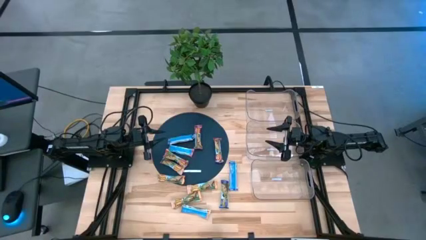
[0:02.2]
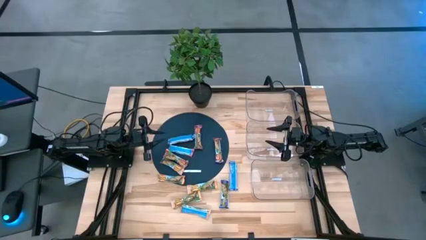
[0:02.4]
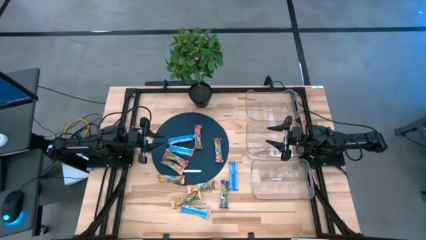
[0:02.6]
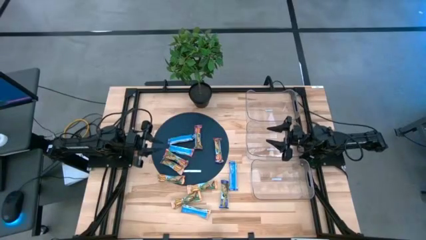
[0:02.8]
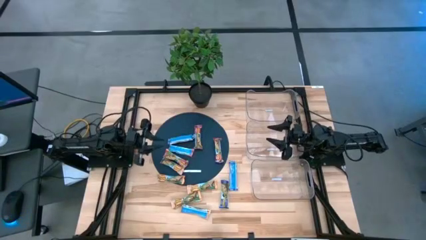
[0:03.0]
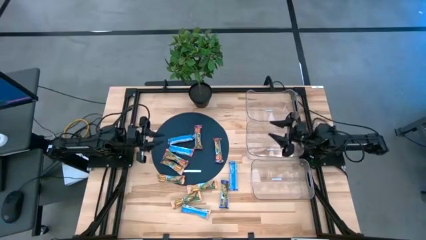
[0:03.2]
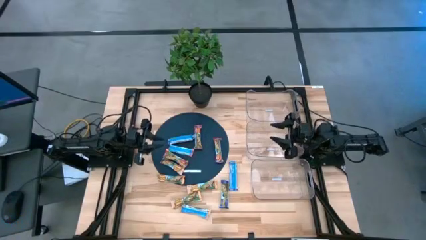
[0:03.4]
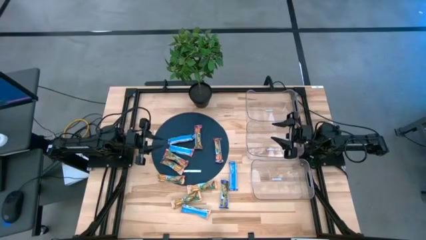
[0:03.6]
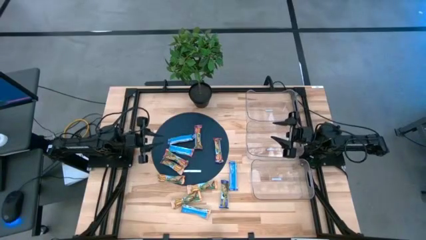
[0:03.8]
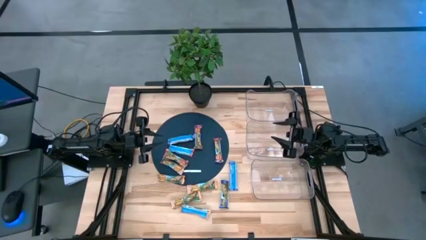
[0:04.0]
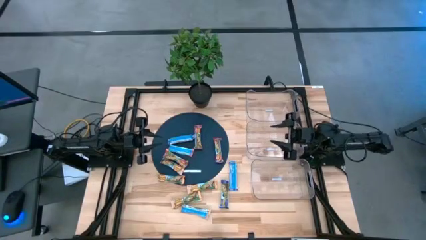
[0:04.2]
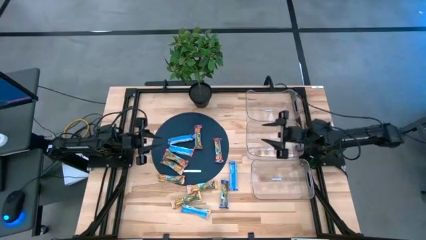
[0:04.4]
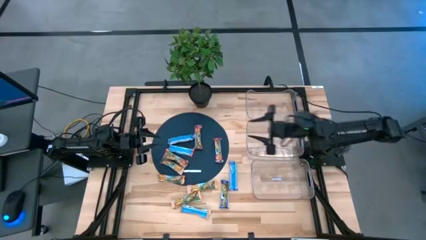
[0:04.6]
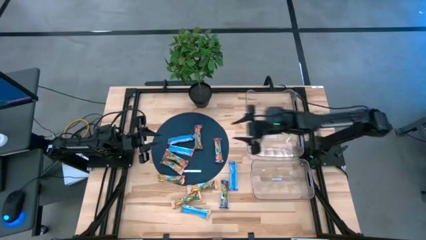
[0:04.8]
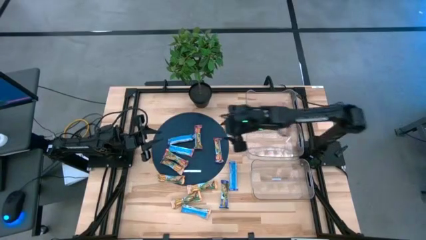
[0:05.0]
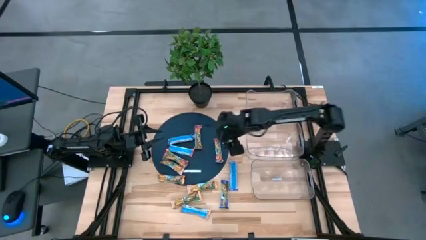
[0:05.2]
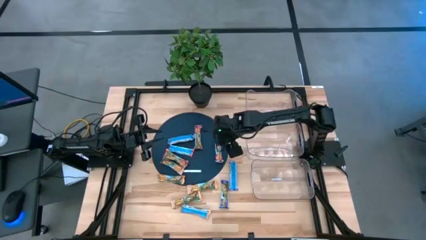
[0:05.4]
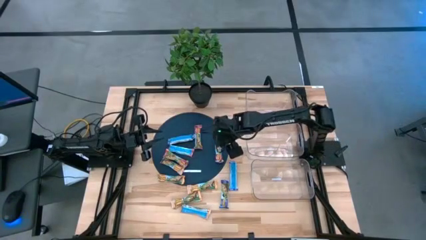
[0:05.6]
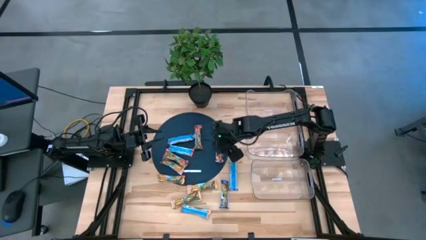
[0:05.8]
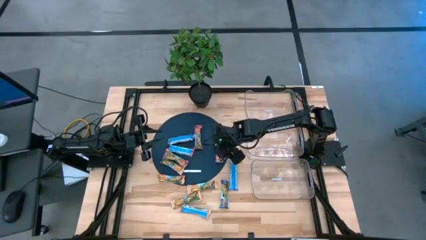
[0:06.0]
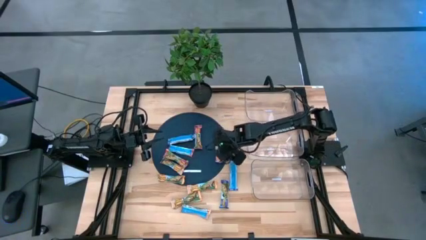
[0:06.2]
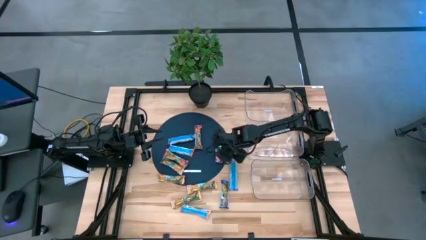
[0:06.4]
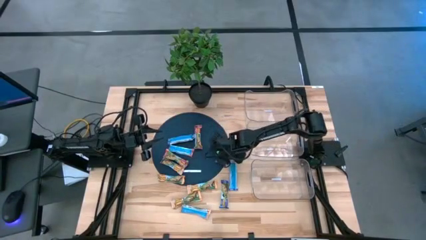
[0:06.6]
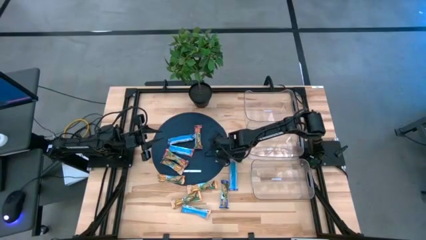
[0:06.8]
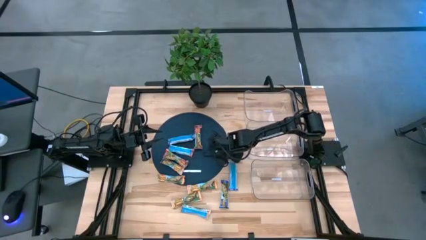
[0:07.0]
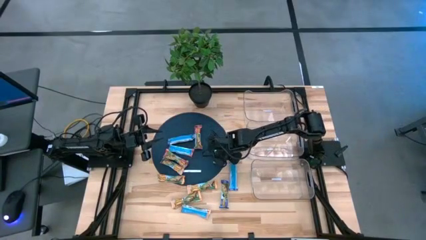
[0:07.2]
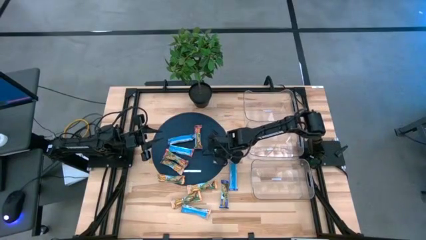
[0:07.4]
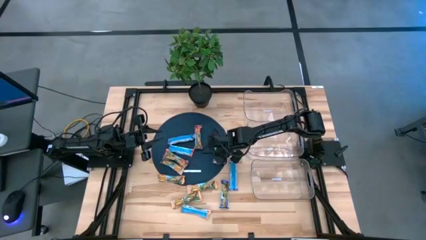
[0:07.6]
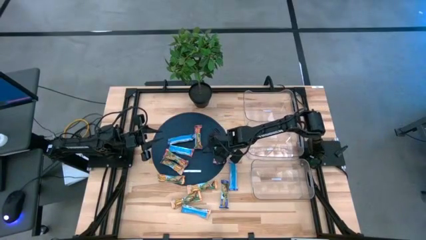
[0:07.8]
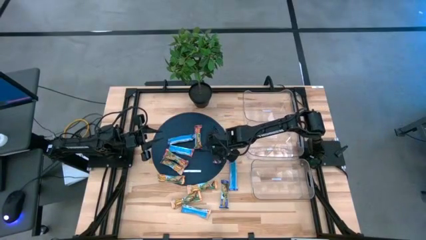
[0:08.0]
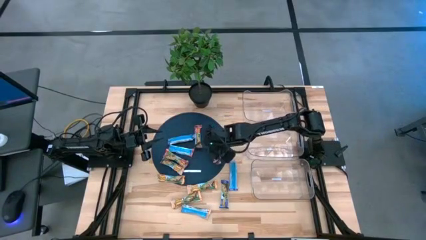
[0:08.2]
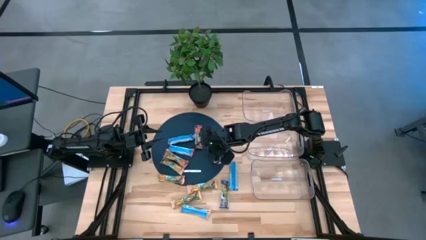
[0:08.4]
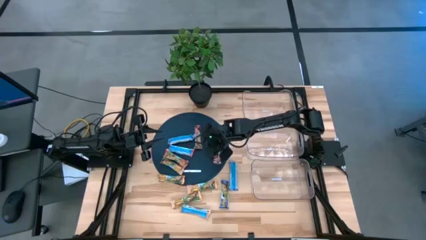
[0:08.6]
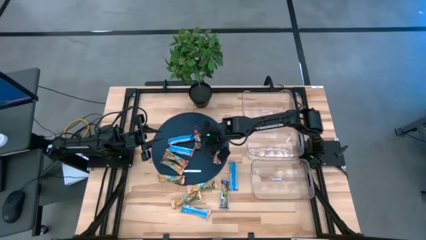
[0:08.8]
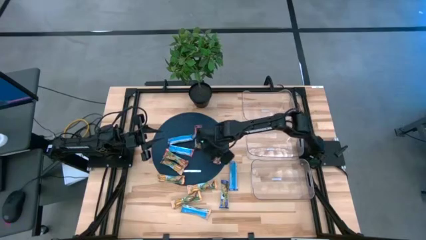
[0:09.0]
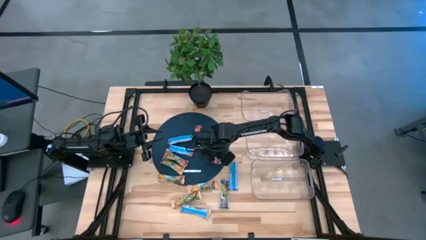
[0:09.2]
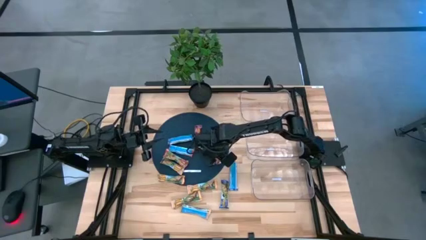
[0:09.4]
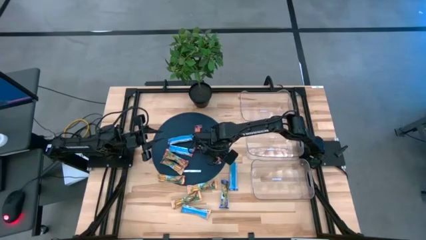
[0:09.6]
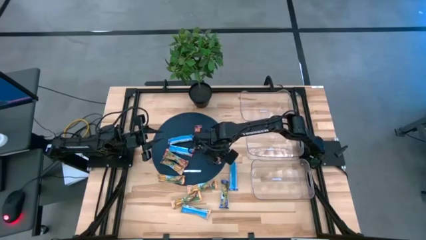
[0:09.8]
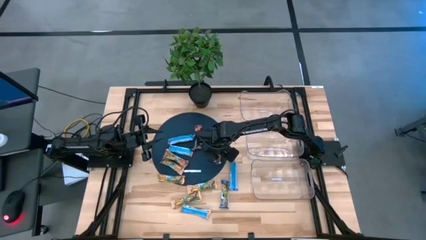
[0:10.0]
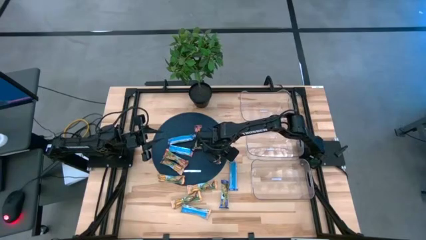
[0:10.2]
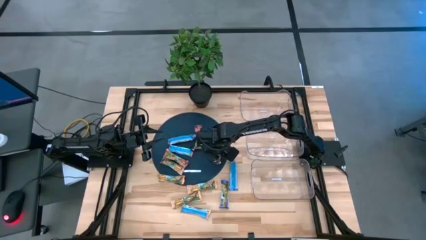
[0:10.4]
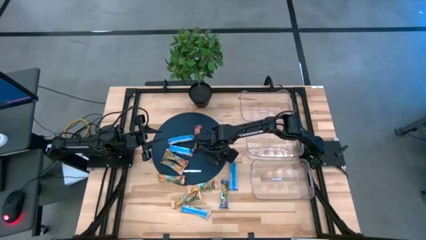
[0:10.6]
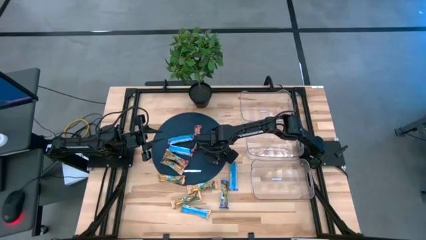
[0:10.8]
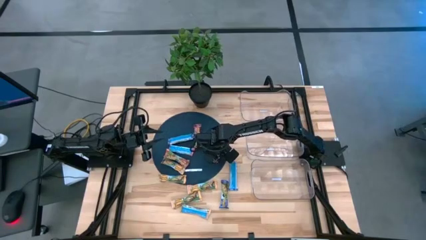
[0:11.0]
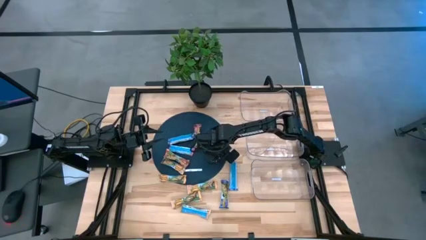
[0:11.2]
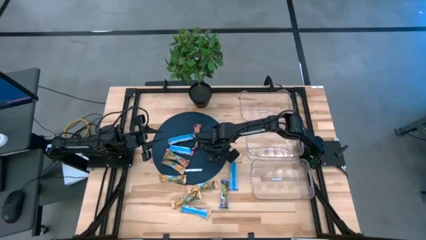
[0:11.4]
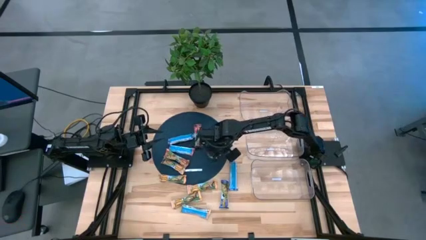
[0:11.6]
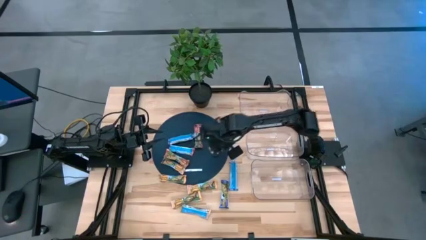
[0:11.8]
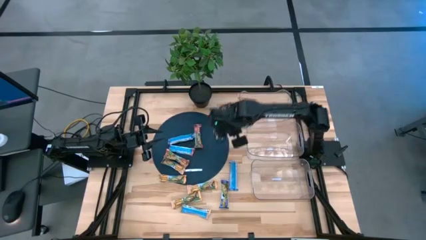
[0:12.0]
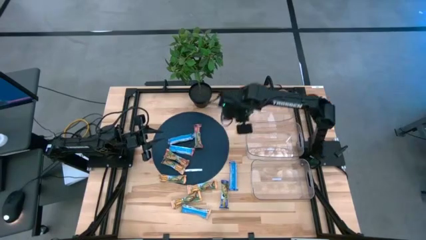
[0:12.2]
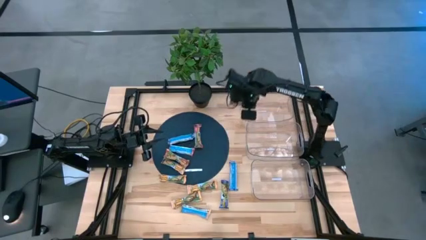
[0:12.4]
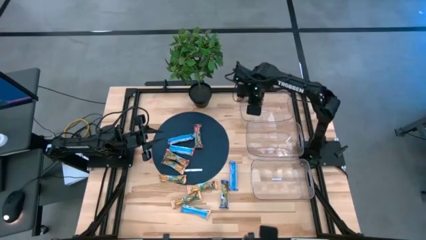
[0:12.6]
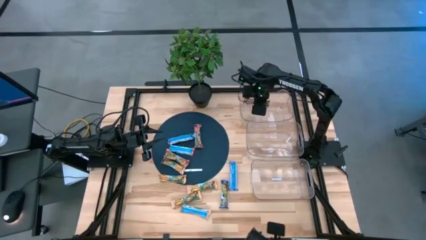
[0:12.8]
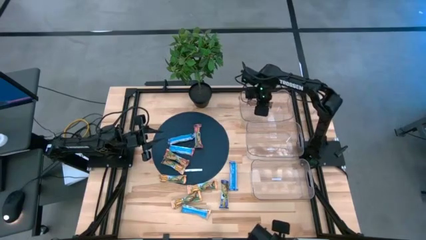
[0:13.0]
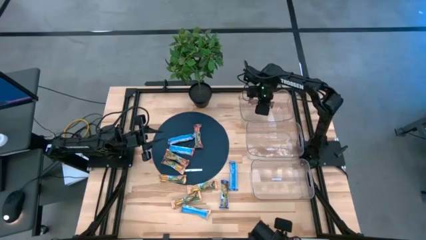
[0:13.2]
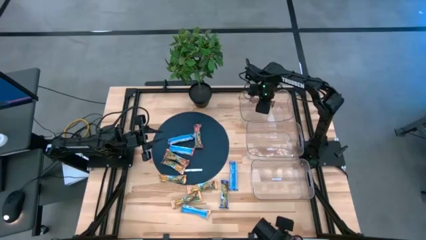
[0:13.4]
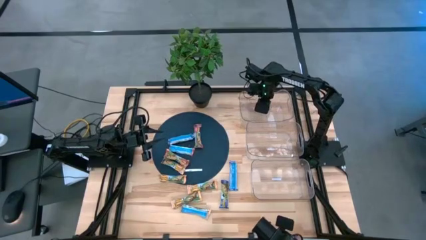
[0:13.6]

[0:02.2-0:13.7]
Task: Pick and place Granola Bars by type
Put the red granola bar into the top transparent bin
